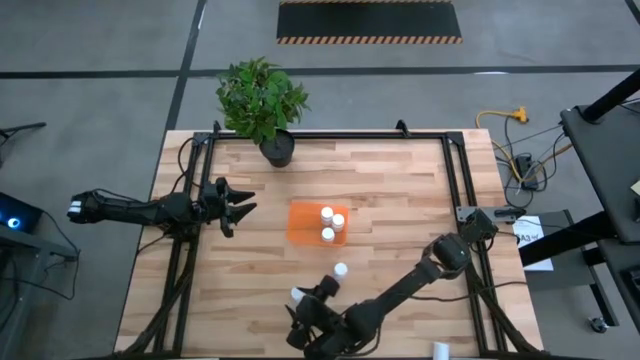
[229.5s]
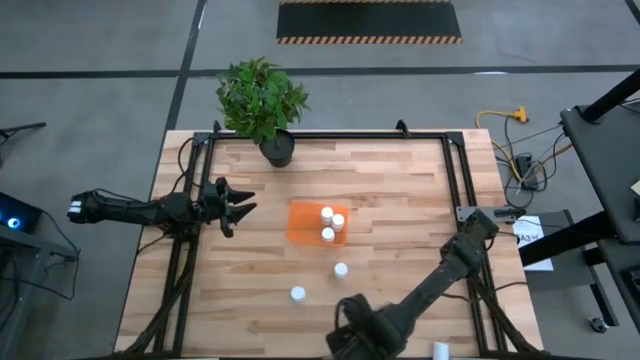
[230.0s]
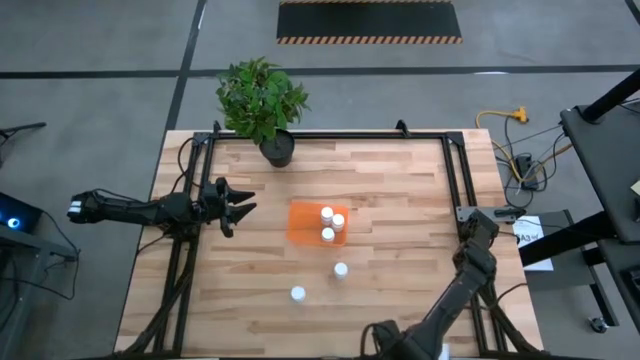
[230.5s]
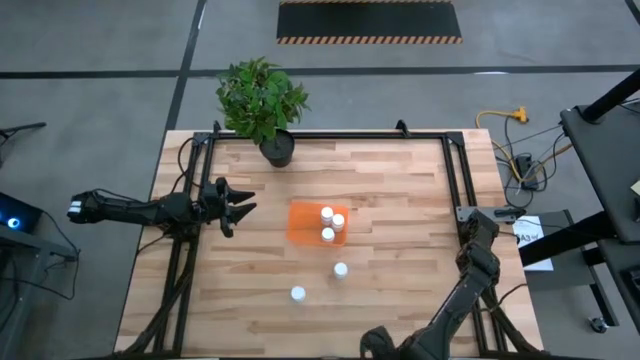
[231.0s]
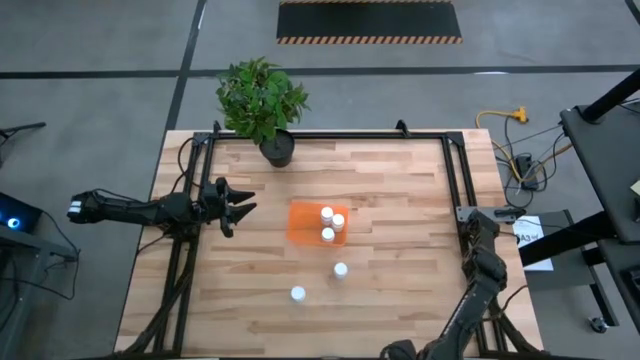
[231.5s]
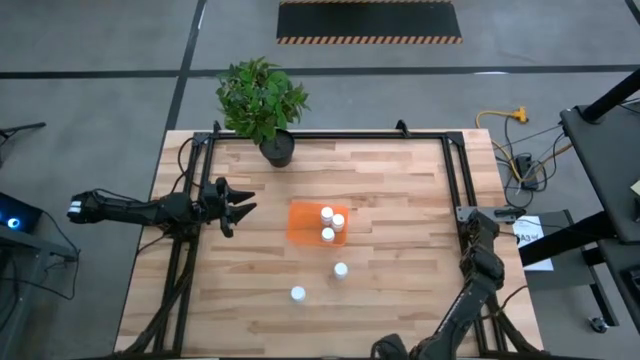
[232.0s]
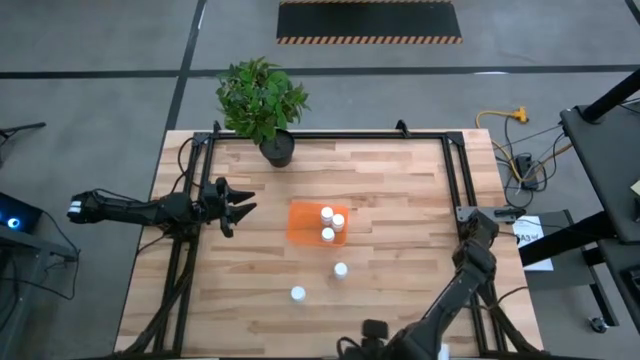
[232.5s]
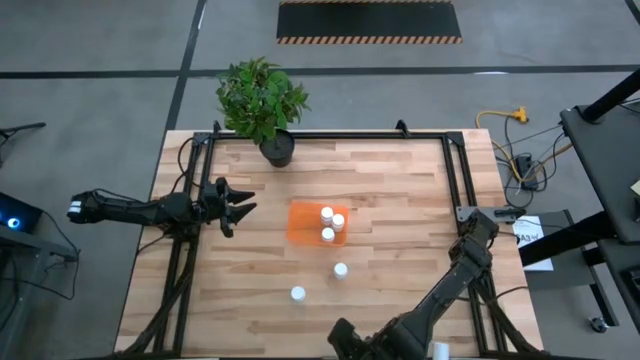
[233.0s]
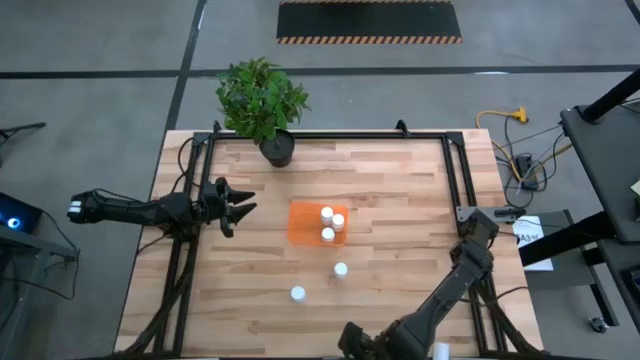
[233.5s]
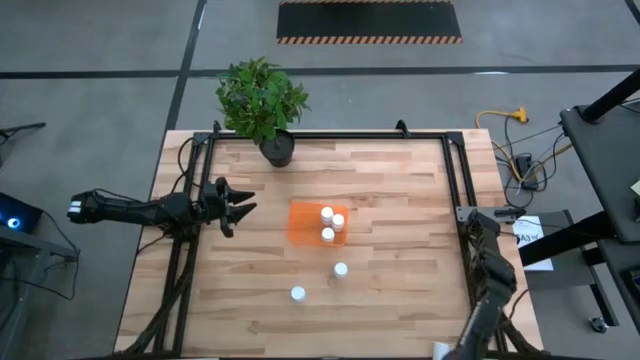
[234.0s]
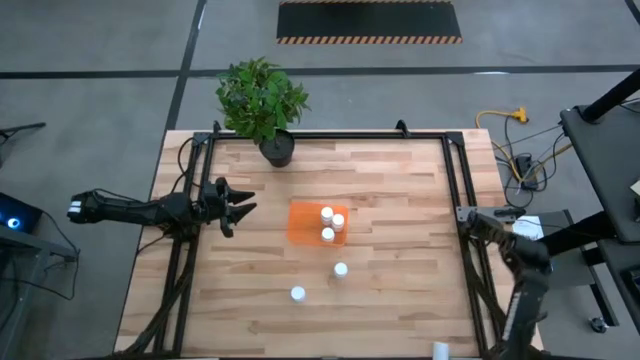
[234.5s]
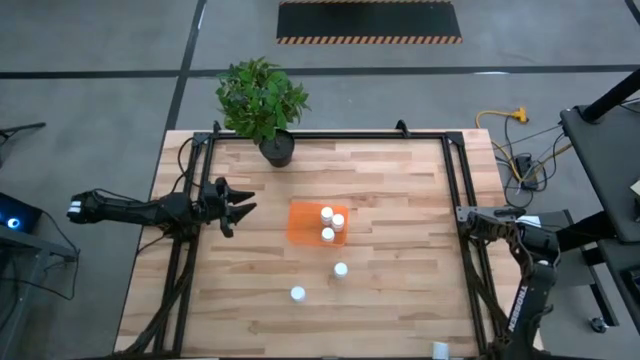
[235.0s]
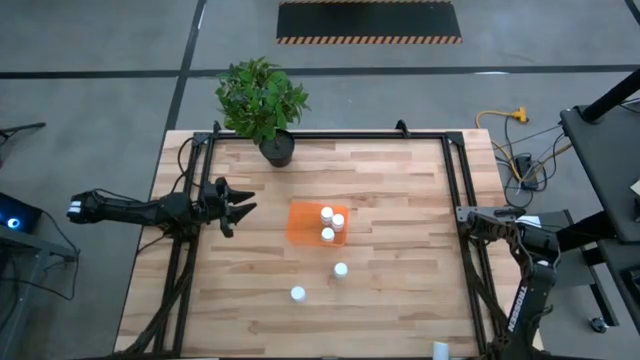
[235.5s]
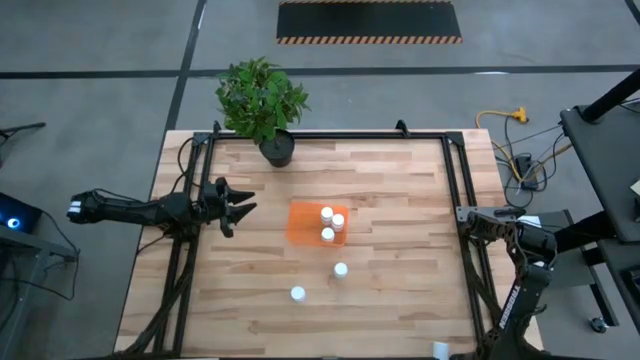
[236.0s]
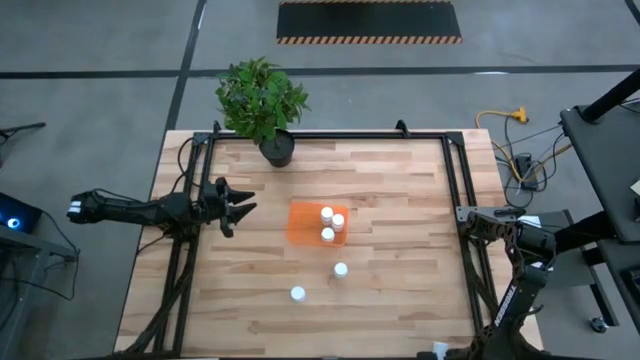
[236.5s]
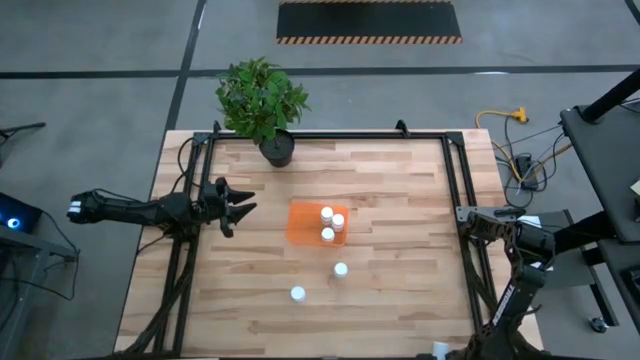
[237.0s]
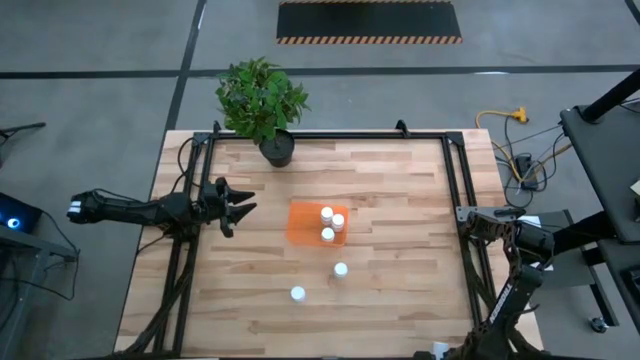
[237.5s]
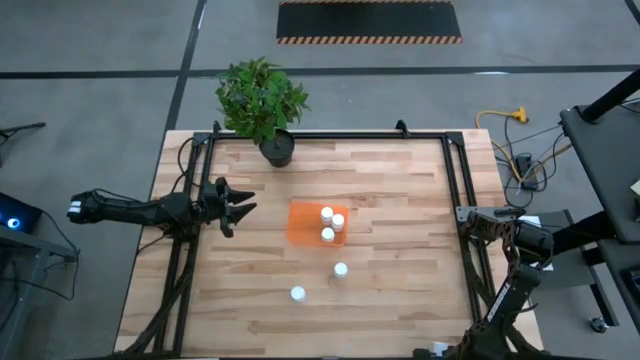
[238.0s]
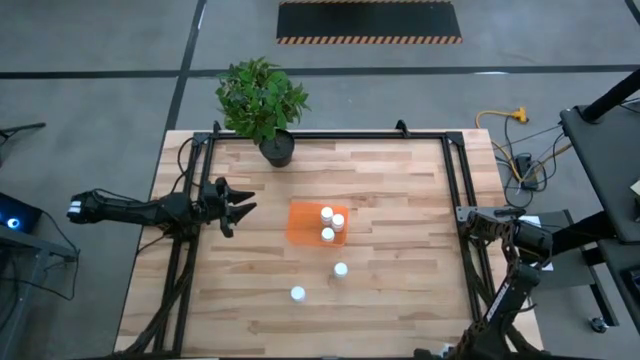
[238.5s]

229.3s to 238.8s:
Task: Pick and place pill bottles into a basket
Put the white pill bottle into the orange container

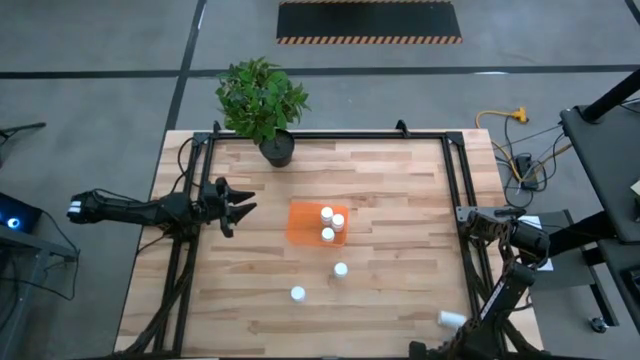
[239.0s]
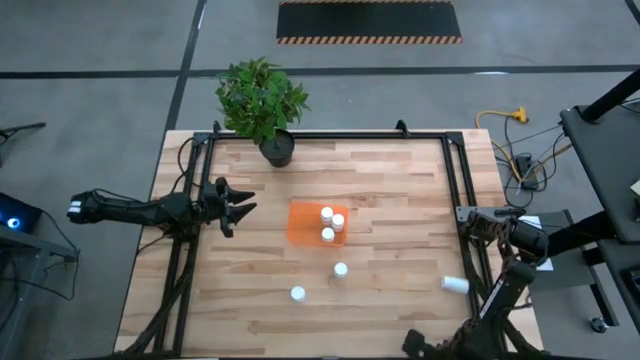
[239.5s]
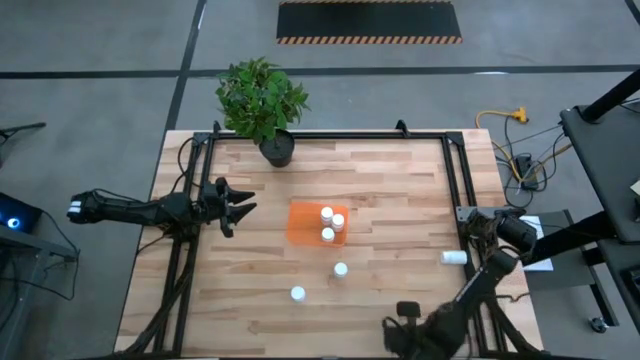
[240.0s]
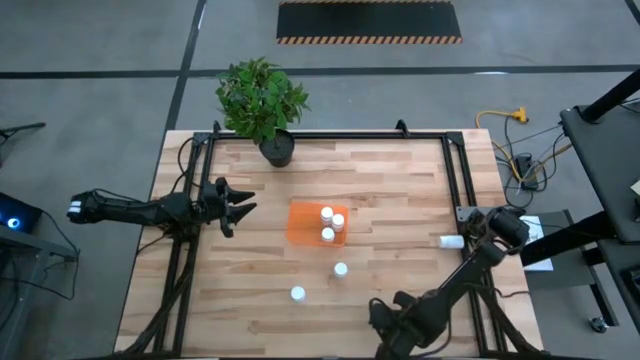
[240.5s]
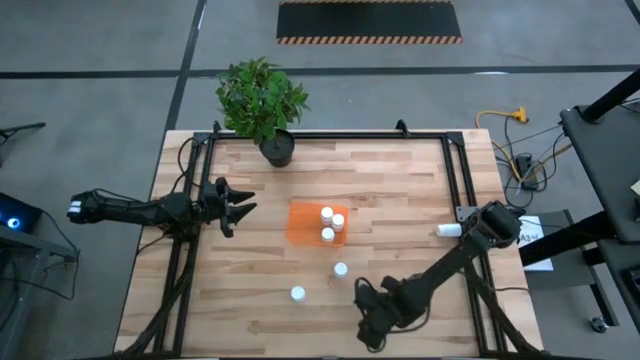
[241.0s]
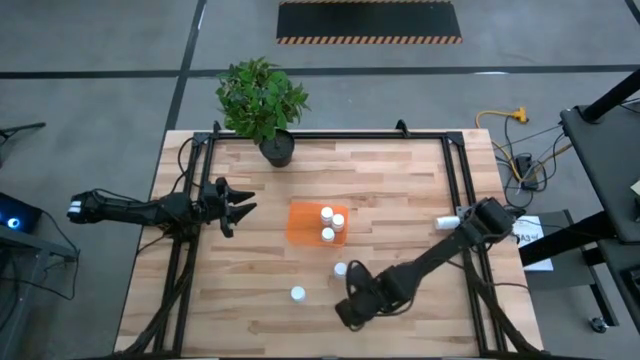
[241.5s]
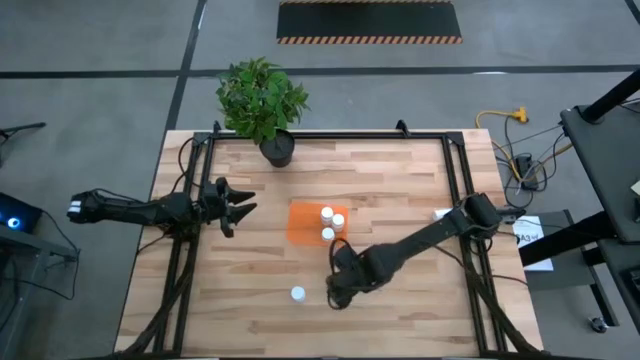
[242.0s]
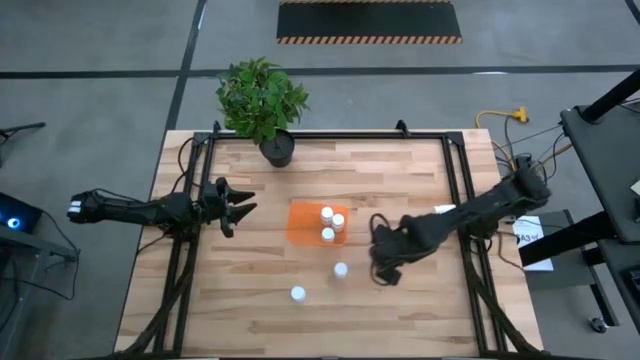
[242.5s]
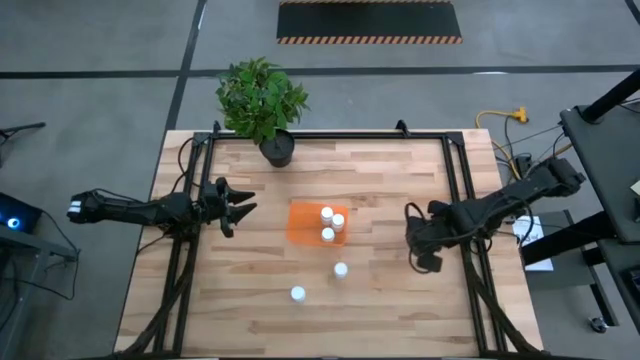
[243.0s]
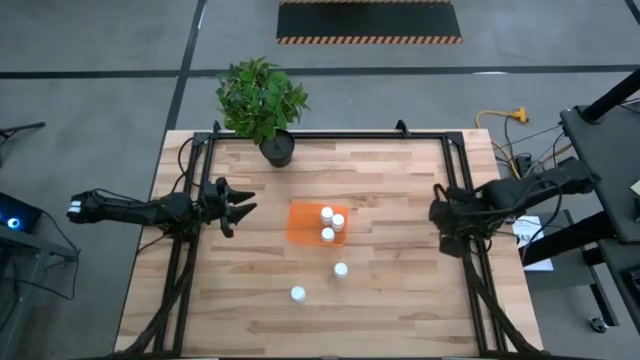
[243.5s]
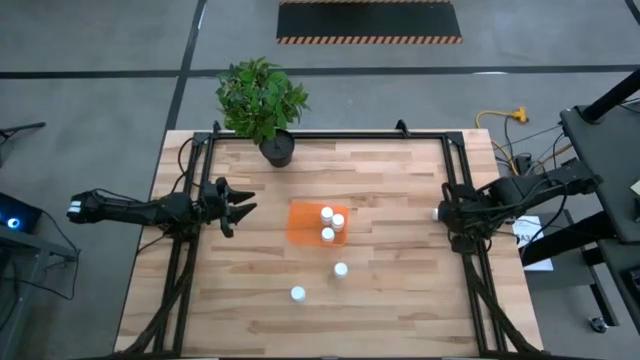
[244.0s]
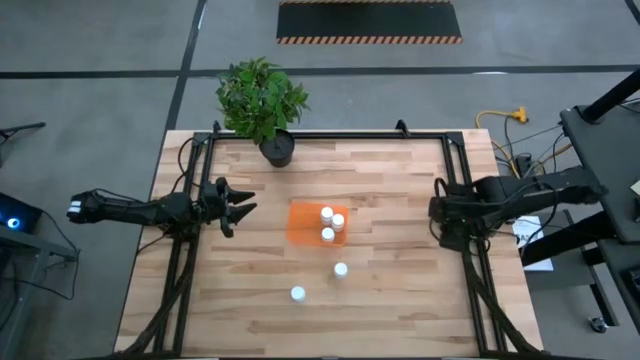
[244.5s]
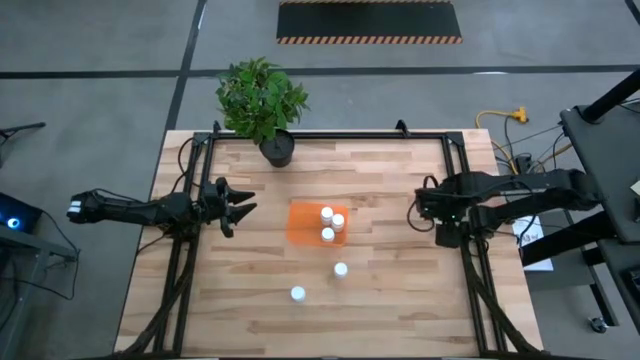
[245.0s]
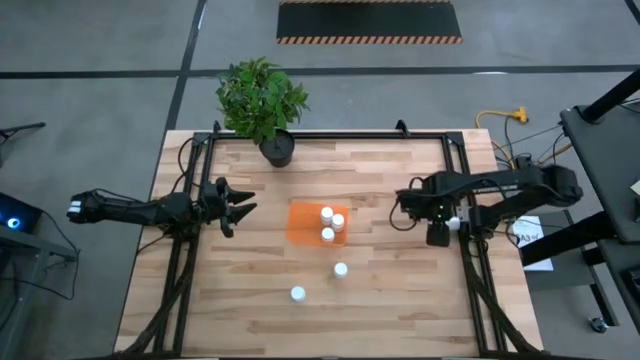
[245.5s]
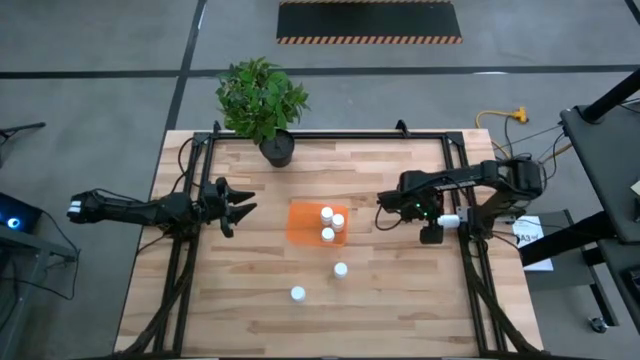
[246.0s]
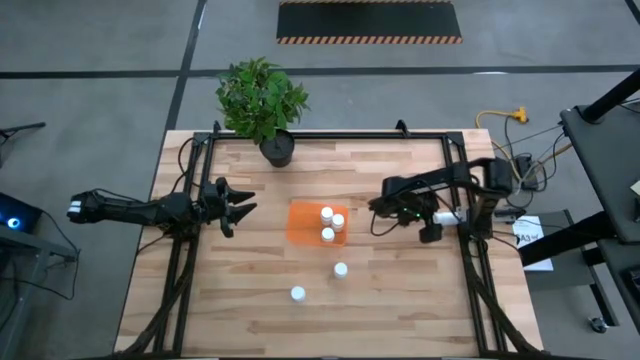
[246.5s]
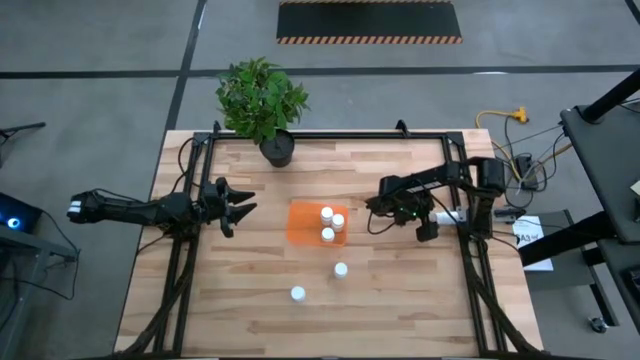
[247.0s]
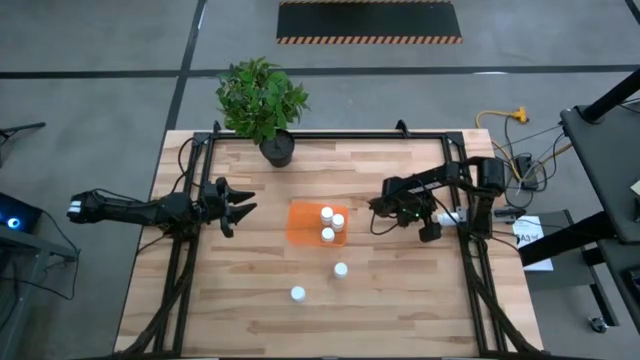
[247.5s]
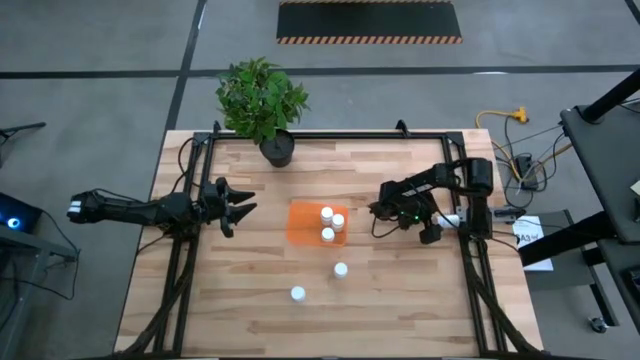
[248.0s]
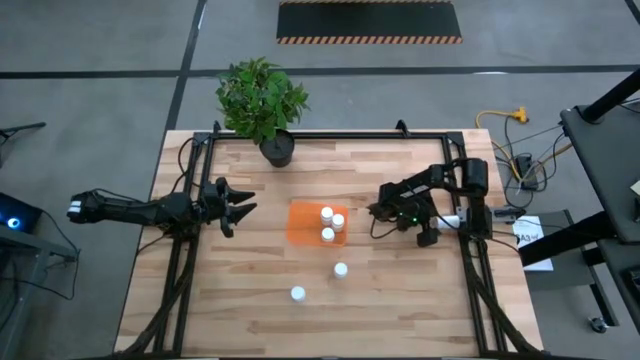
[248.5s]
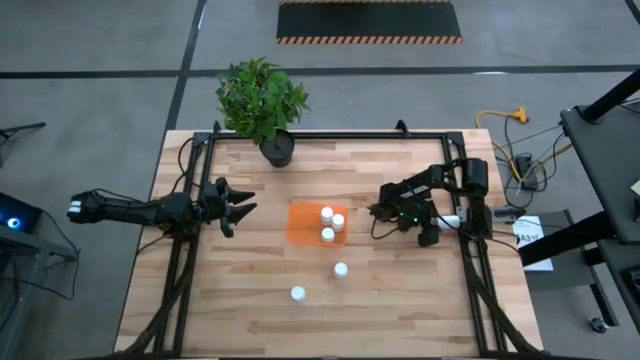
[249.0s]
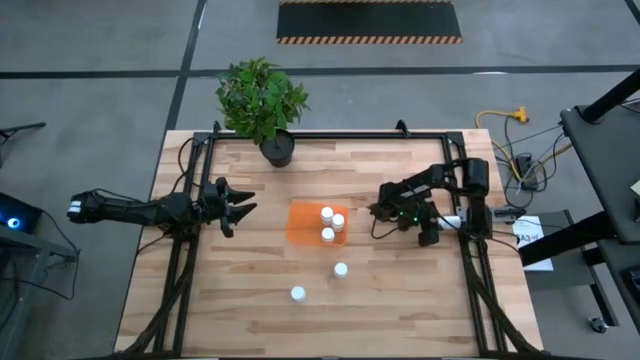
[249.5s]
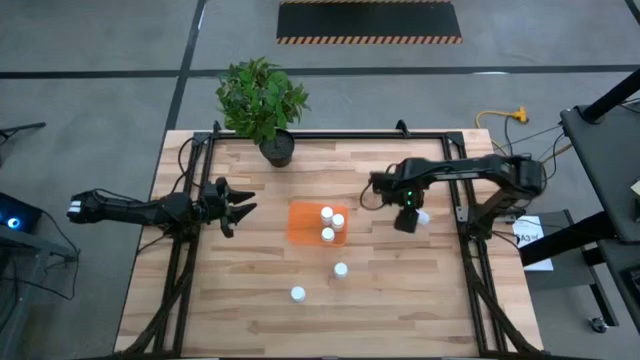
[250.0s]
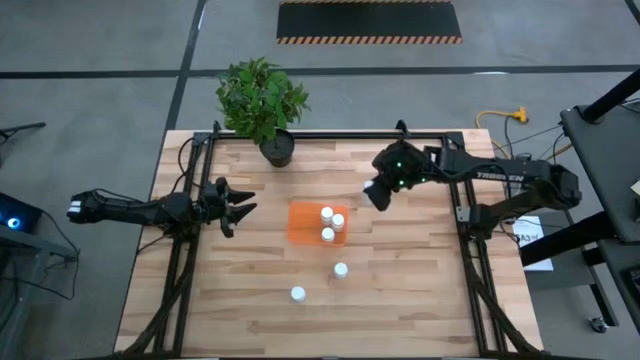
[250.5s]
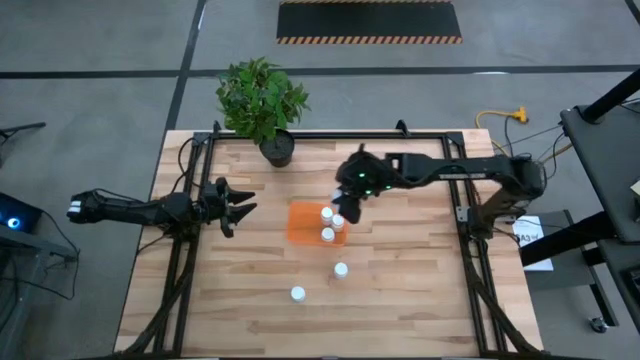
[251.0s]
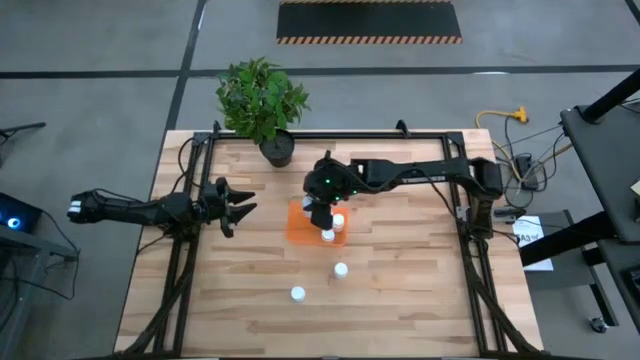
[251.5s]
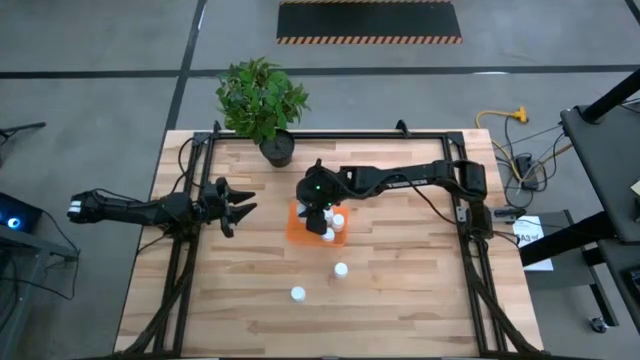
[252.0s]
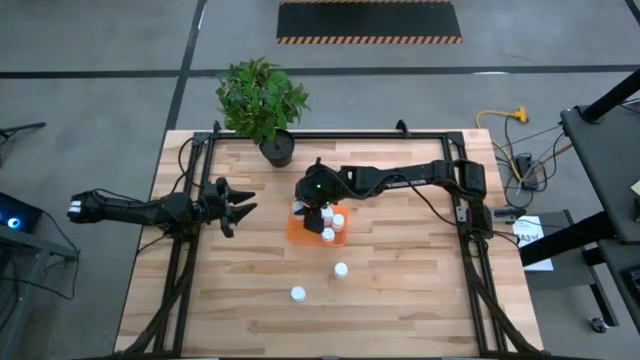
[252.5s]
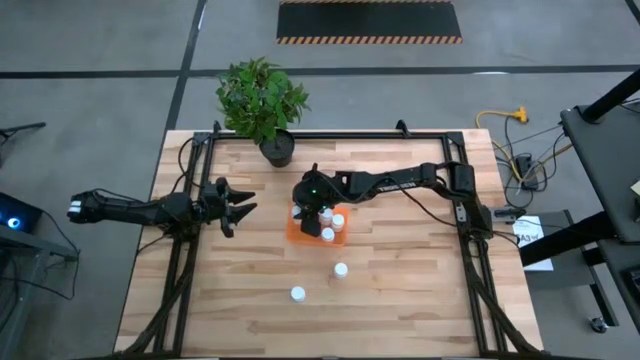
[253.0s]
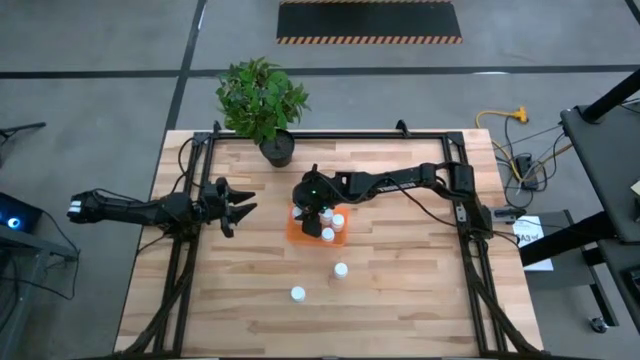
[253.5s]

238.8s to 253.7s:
Put the white pill bottle into the orange container
